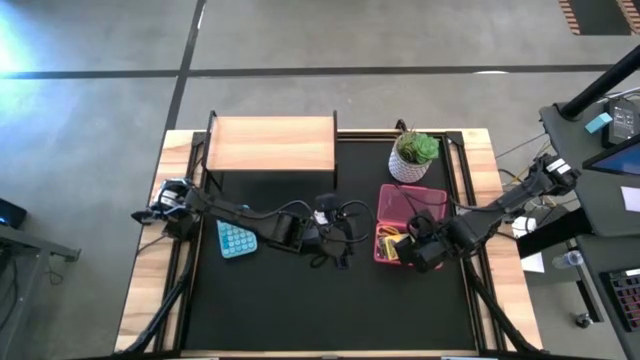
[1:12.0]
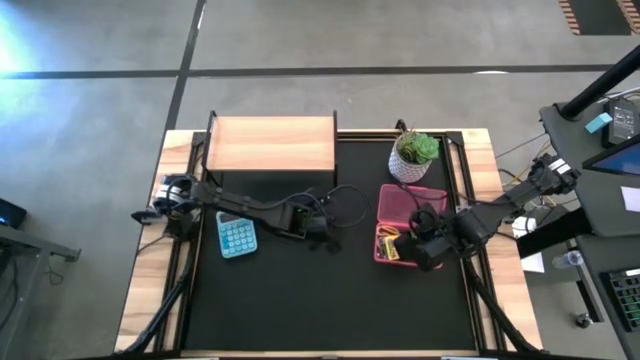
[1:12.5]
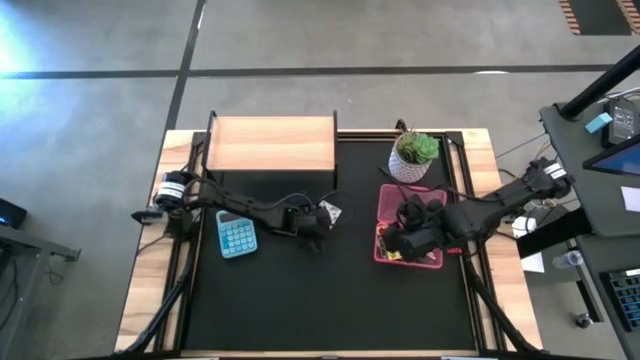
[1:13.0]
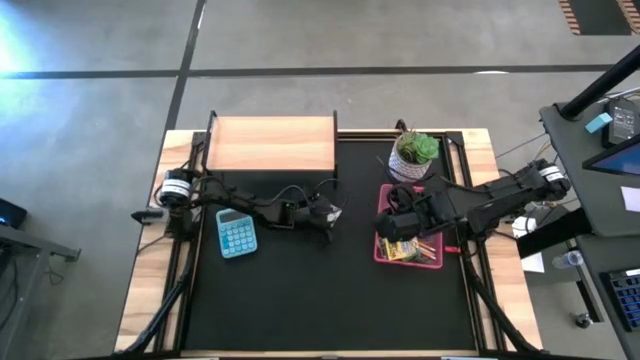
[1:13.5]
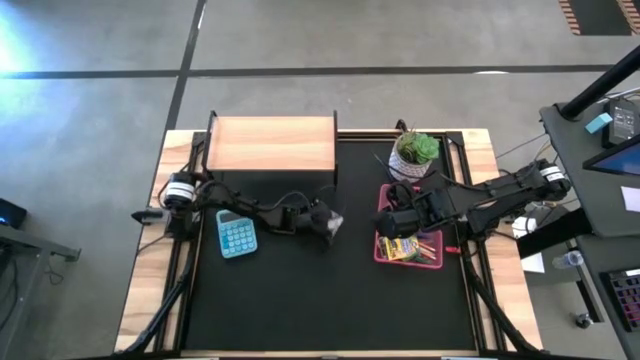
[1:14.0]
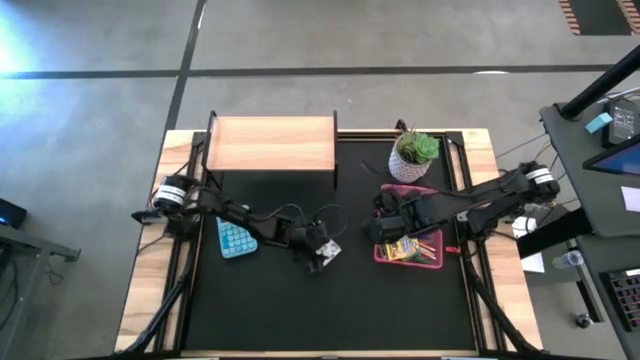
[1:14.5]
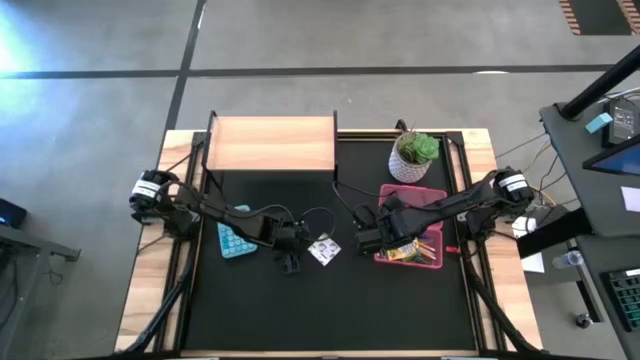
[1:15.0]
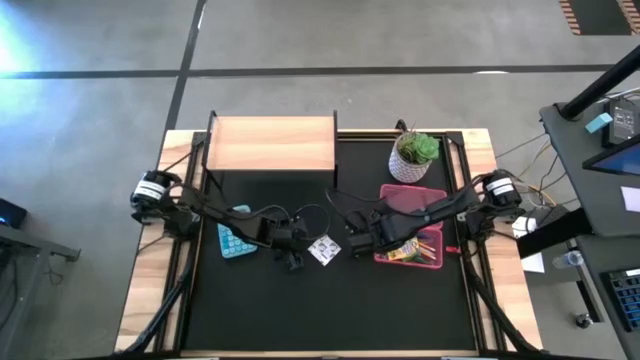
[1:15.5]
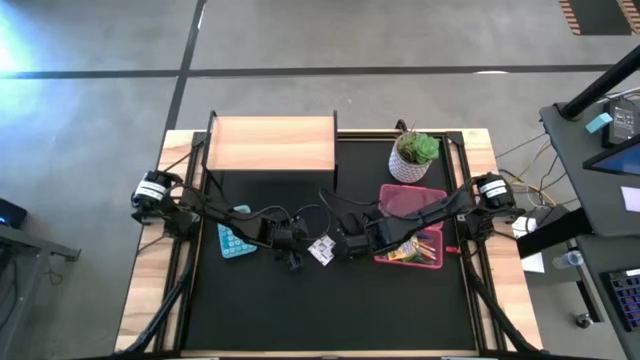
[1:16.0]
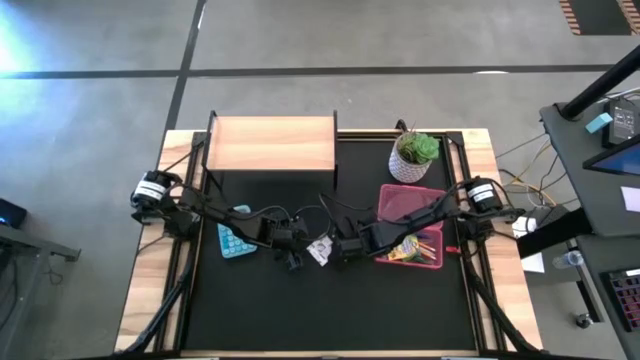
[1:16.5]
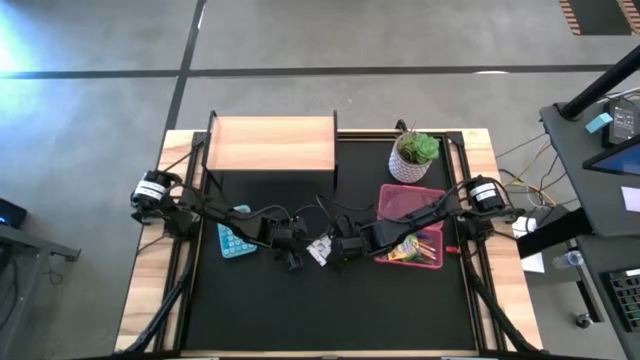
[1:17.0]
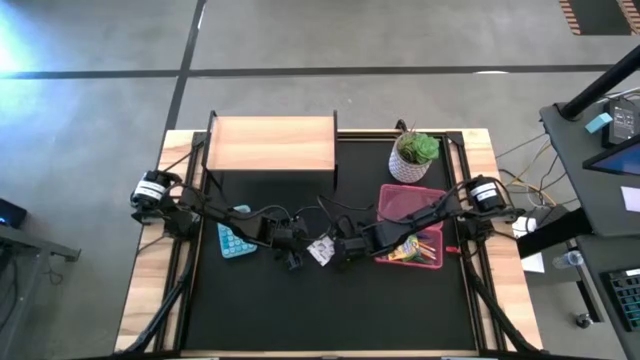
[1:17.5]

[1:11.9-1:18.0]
Task: Pack school essentials
Put the white sticky notes into the pink case

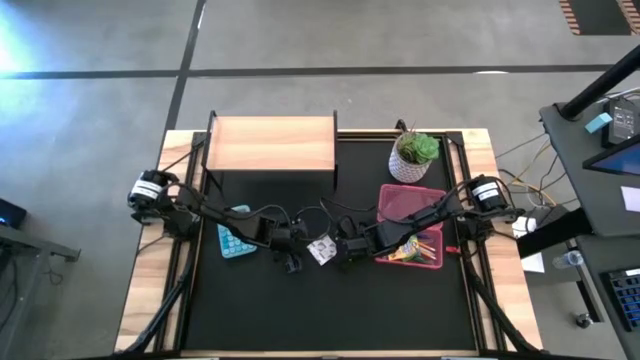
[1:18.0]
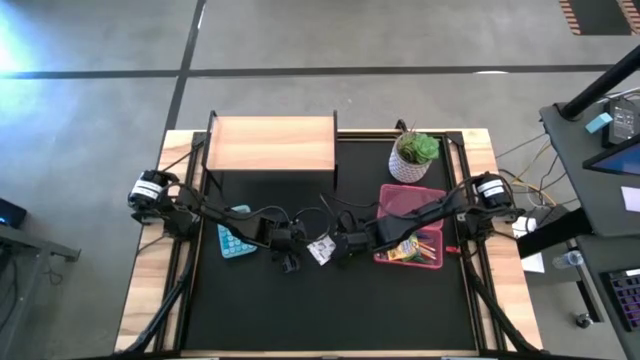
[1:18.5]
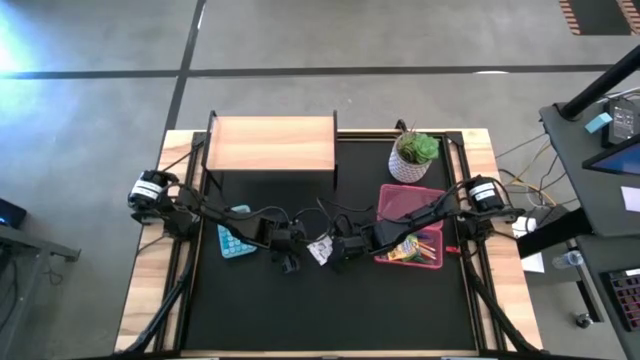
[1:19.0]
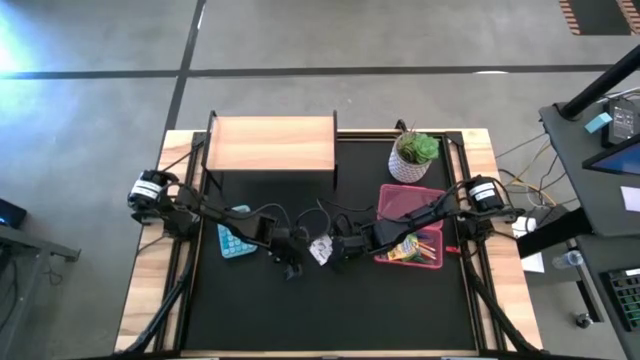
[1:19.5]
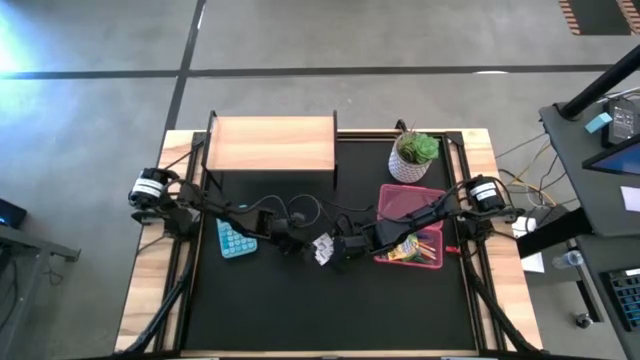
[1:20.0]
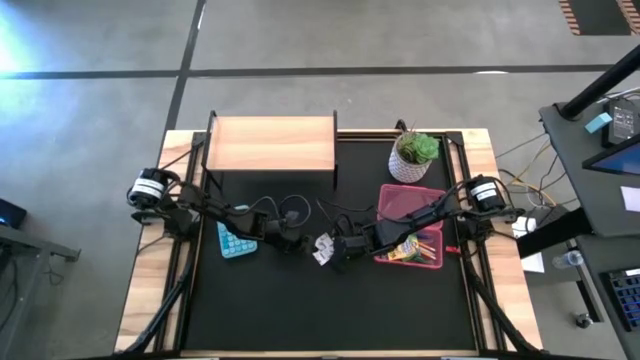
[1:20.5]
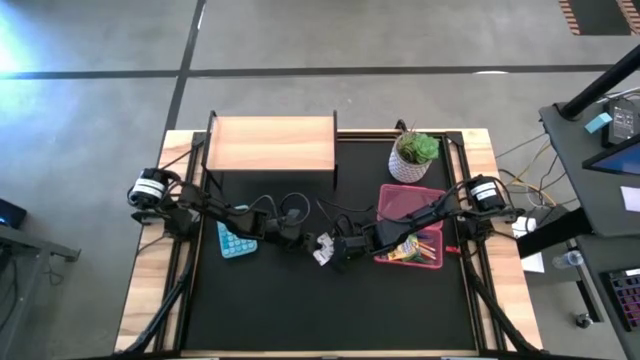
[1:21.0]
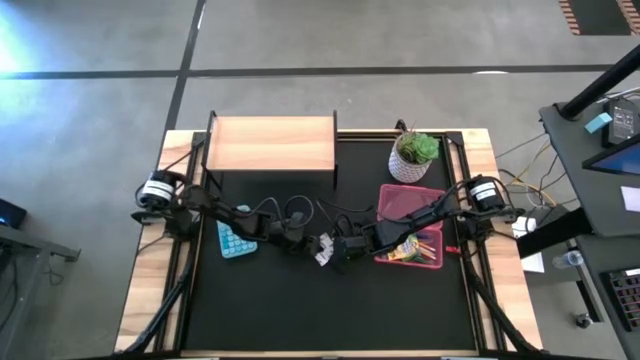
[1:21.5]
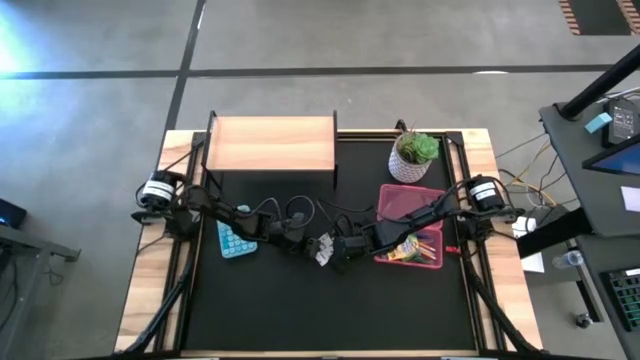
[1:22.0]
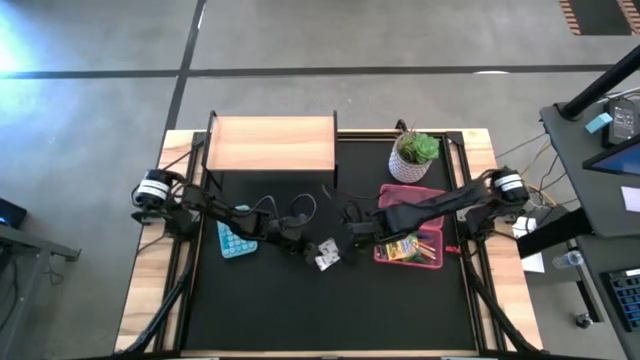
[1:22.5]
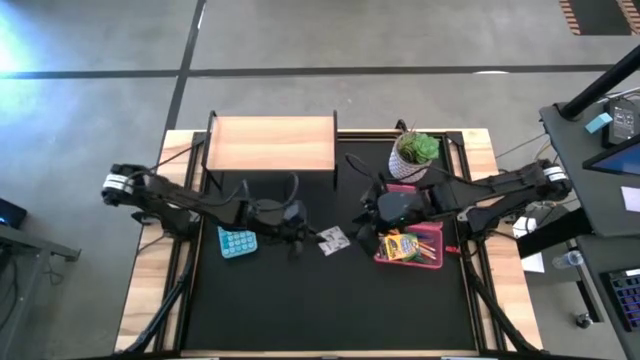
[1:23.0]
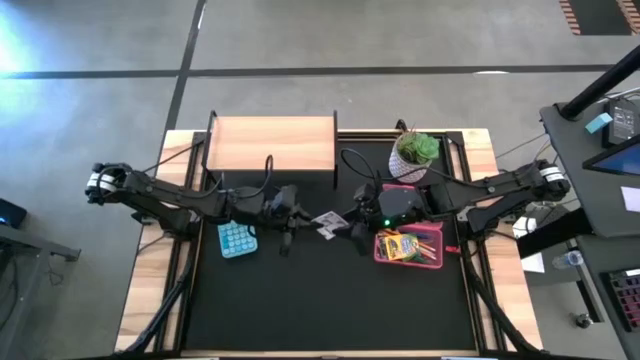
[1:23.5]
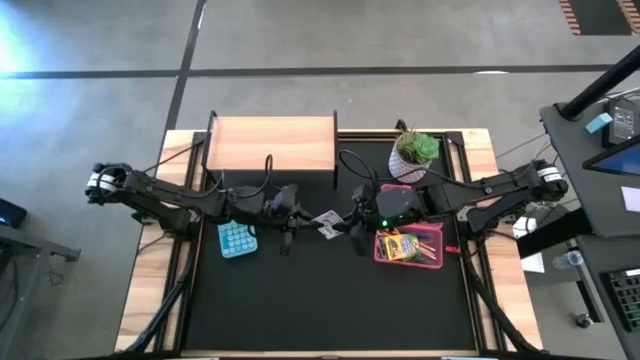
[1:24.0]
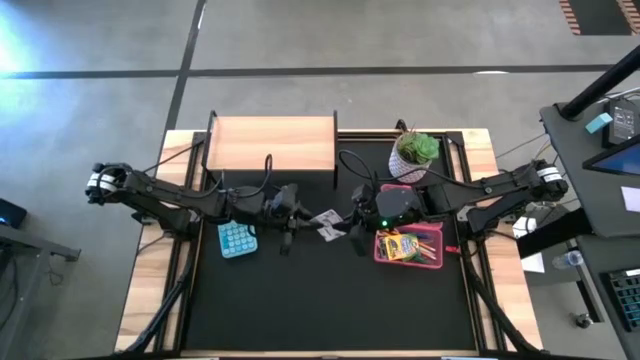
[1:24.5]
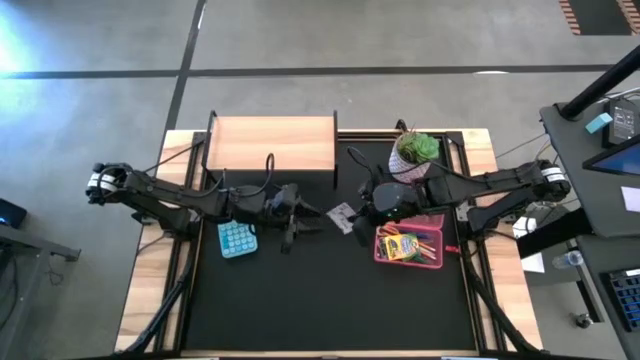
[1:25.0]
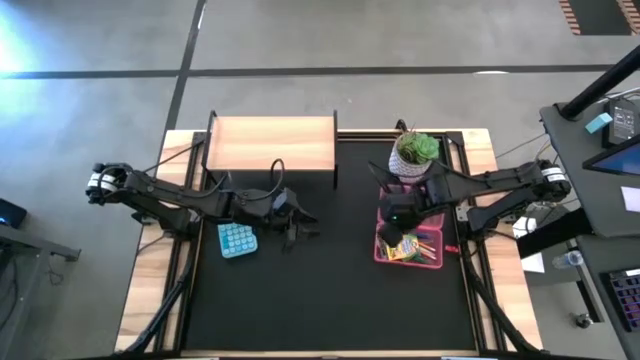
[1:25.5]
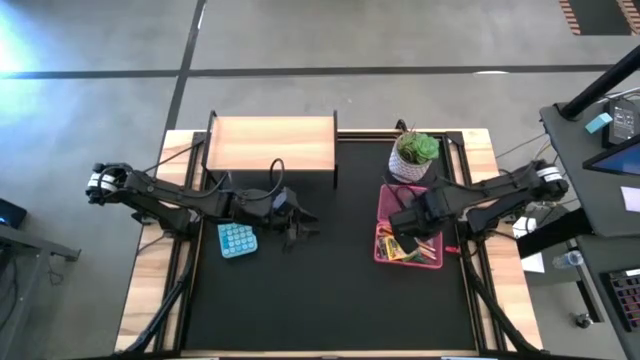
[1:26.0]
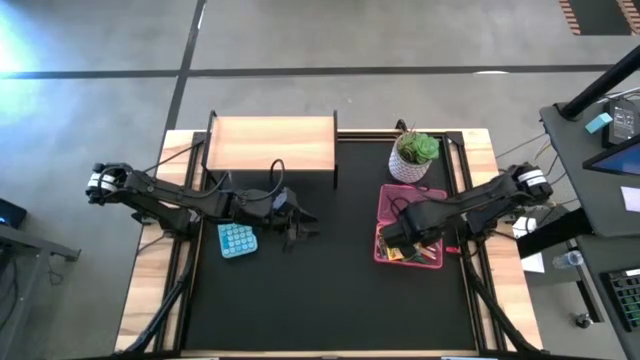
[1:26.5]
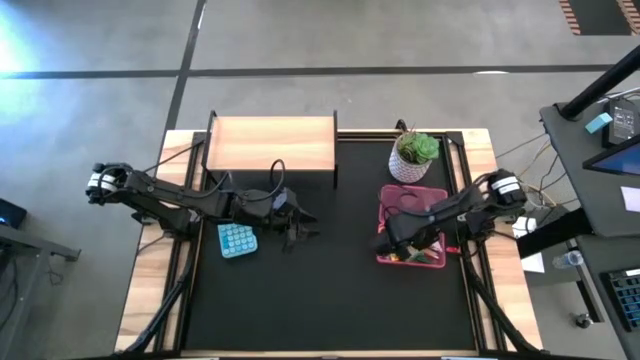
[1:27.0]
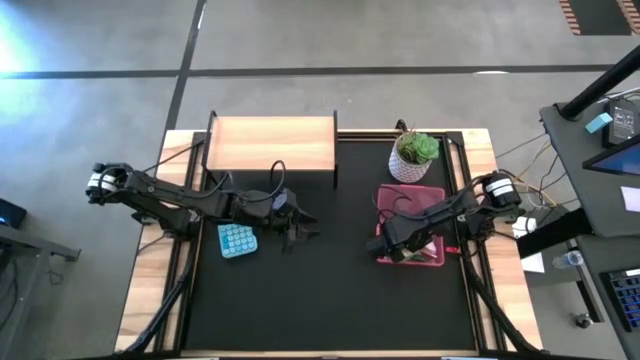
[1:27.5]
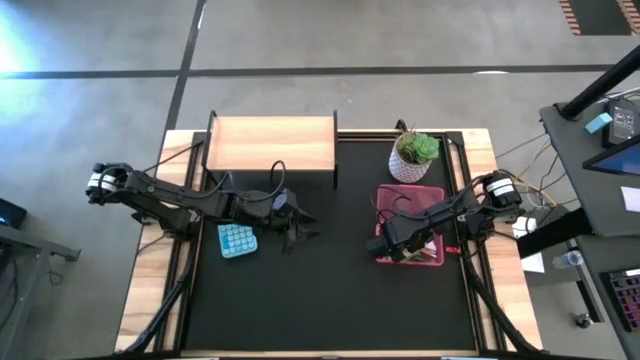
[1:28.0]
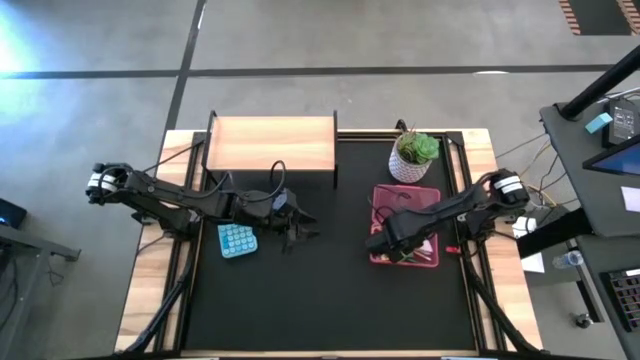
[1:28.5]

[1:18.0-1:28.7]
Put the white sticky notes into the pink case

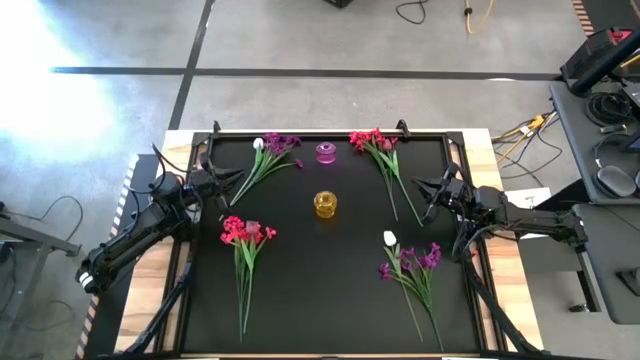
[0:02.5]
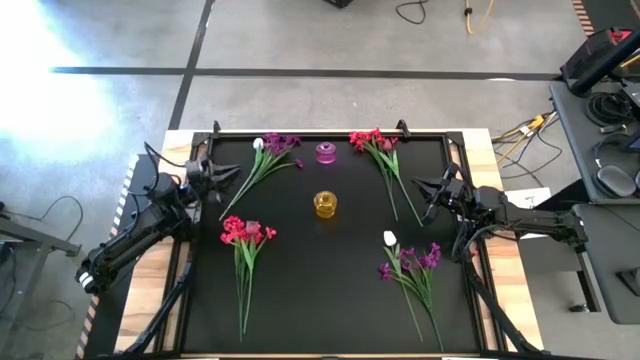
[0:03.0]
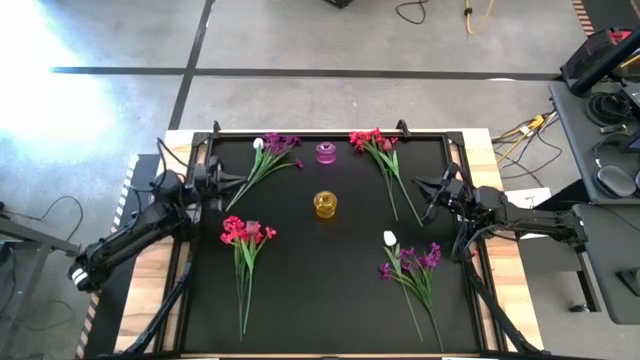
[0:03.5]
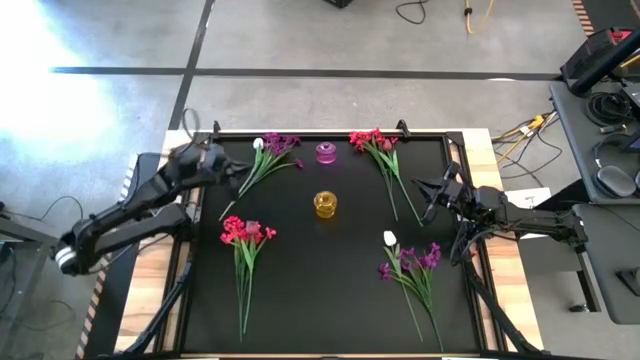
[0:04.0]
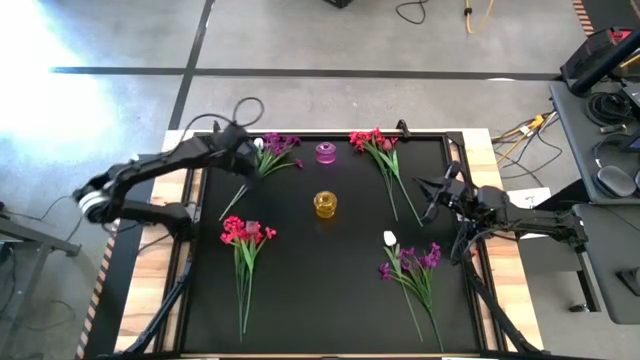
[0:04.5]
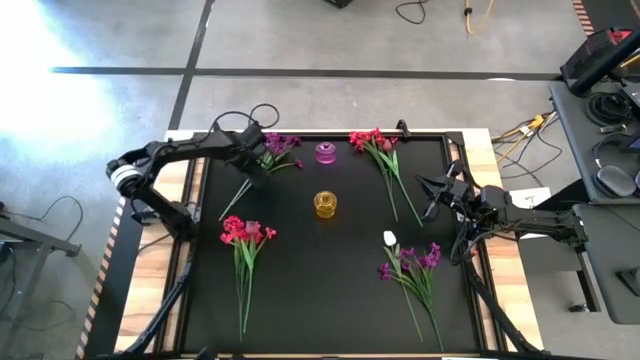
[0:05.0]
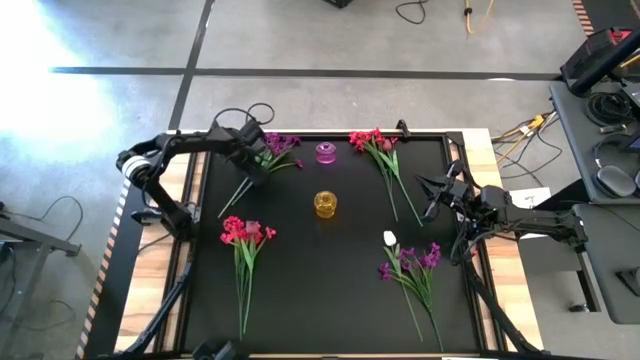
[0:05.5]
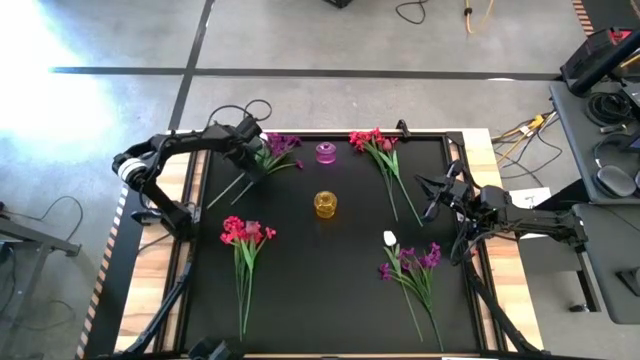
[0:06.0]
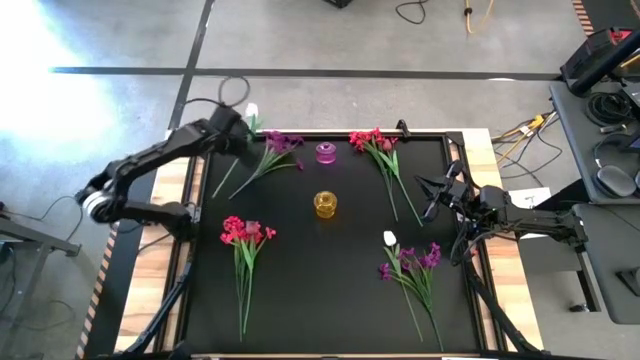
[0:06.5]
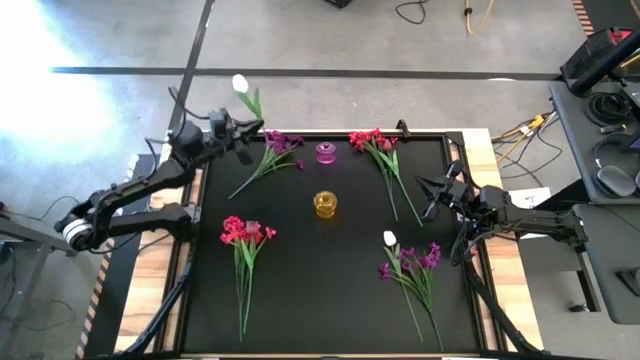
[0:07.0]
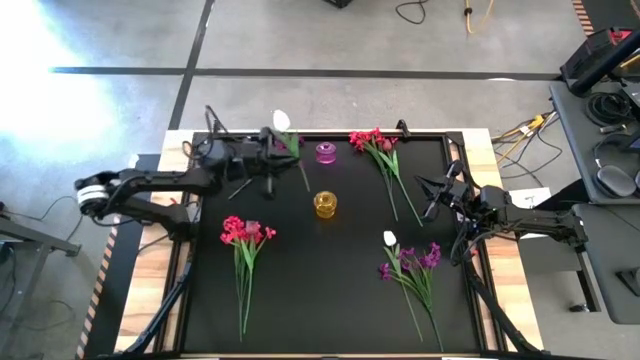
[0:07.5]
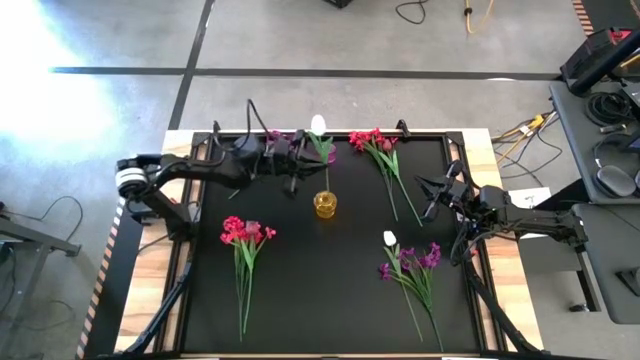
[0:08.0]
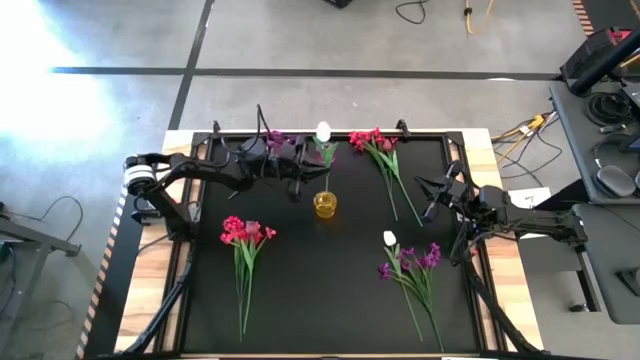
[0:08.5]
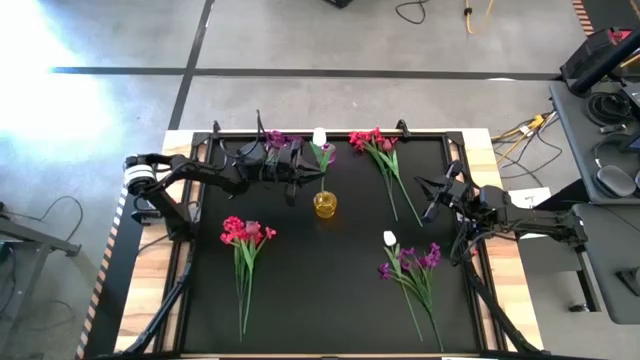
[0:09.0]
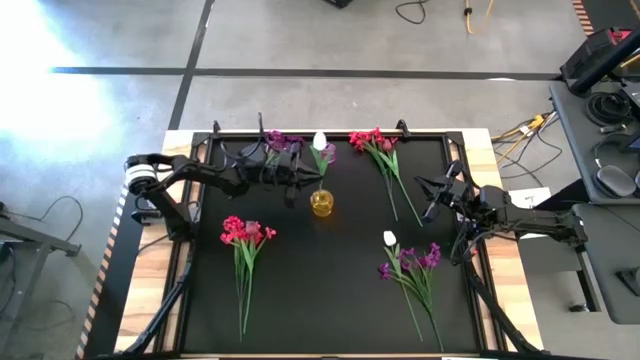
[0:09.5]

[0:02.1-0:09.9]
Task: Sort flowers into vase by color
Put the top white tulip into the yellow vase
